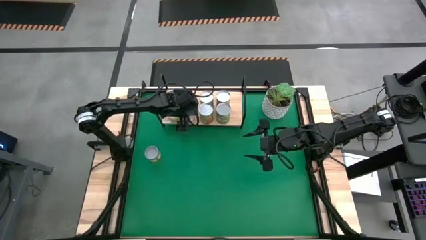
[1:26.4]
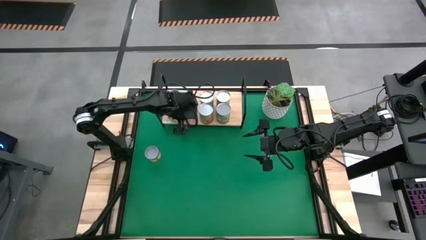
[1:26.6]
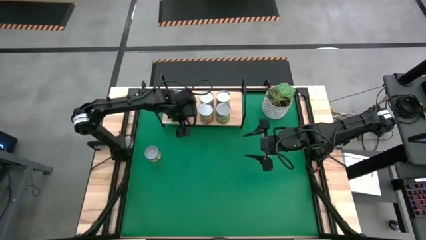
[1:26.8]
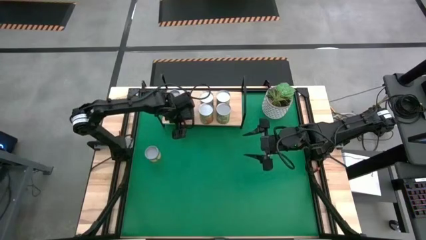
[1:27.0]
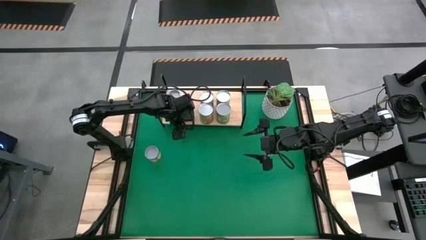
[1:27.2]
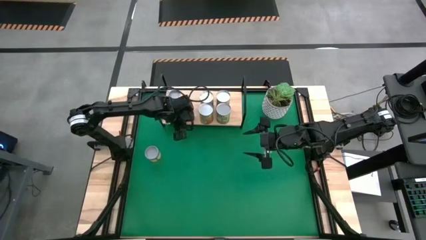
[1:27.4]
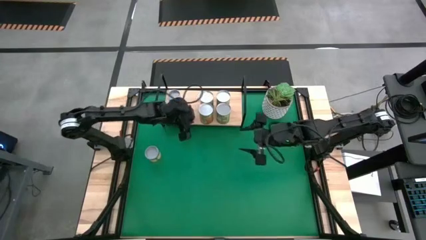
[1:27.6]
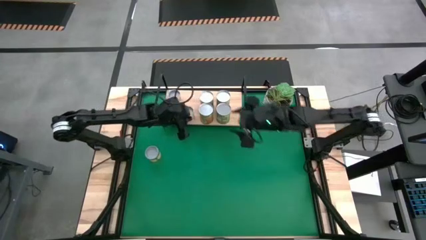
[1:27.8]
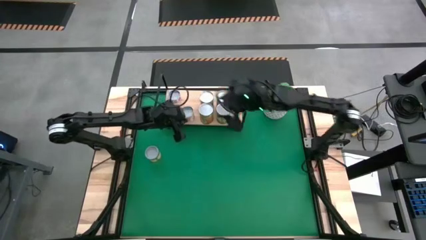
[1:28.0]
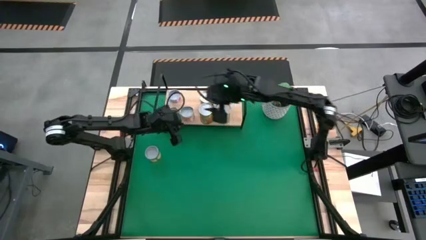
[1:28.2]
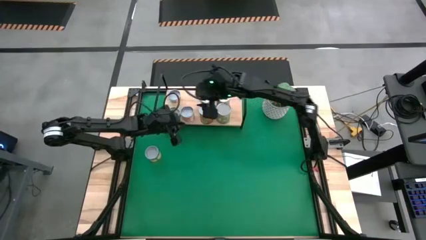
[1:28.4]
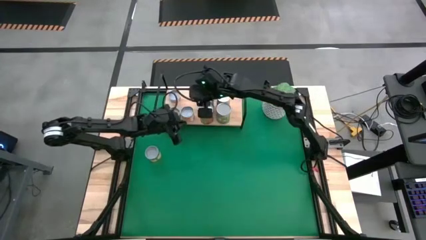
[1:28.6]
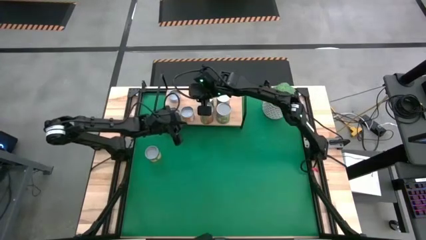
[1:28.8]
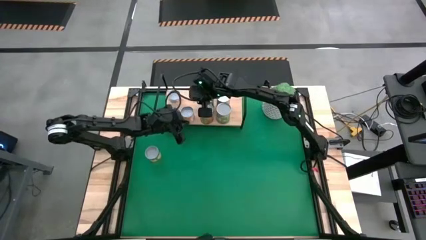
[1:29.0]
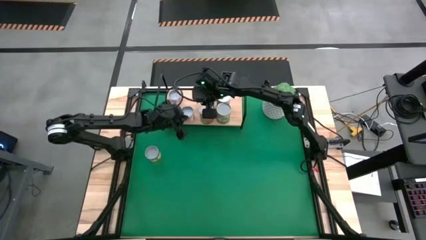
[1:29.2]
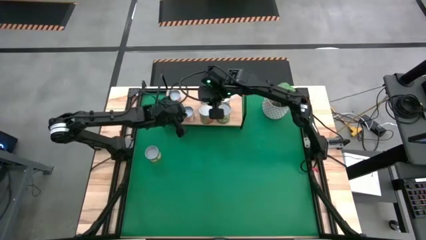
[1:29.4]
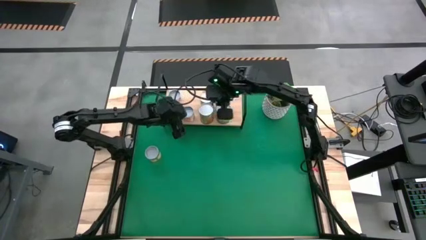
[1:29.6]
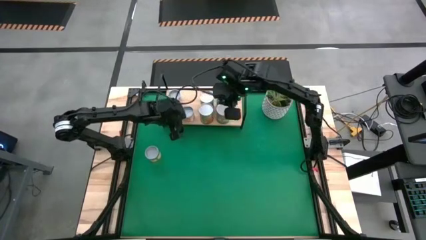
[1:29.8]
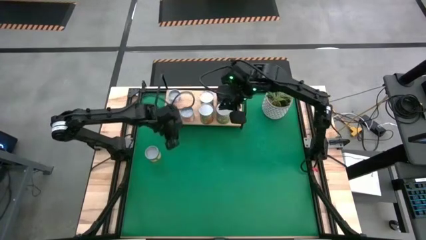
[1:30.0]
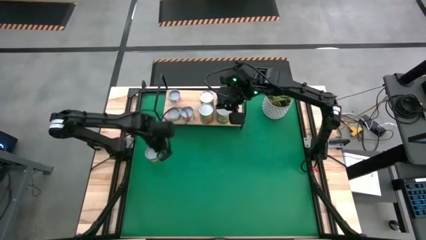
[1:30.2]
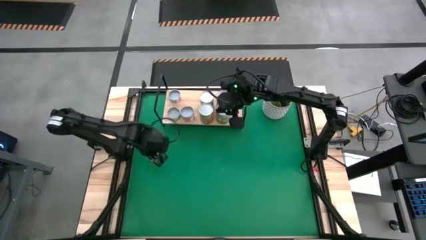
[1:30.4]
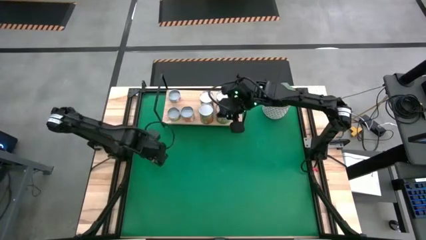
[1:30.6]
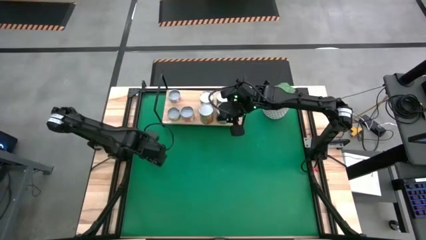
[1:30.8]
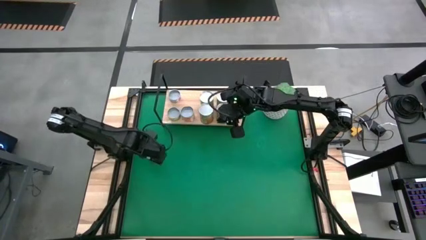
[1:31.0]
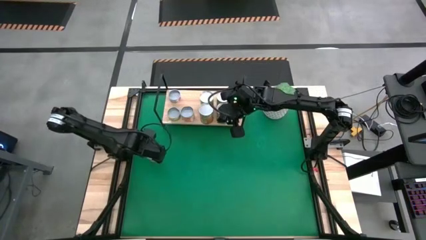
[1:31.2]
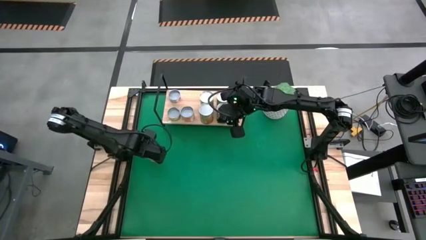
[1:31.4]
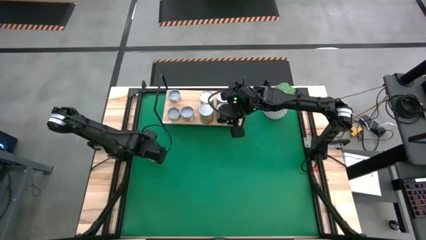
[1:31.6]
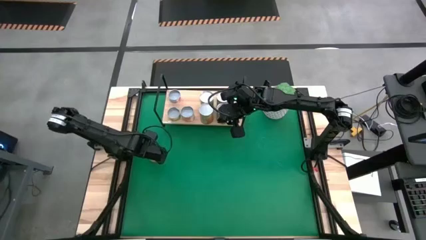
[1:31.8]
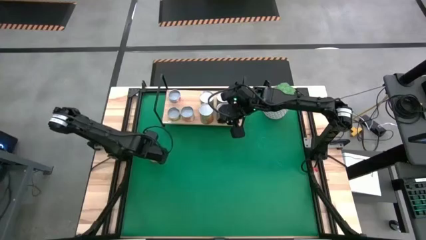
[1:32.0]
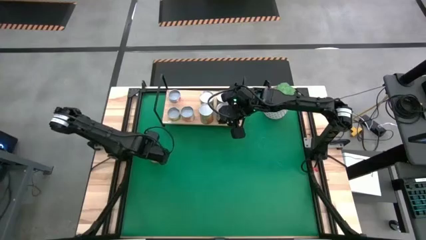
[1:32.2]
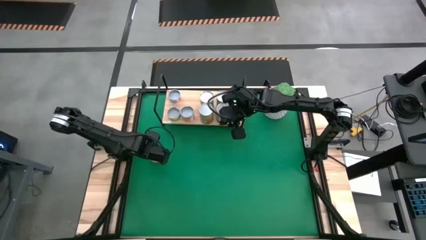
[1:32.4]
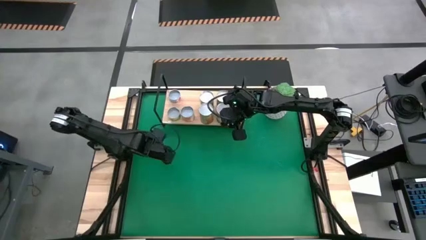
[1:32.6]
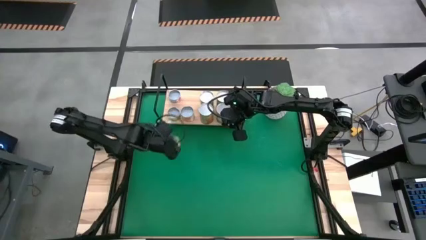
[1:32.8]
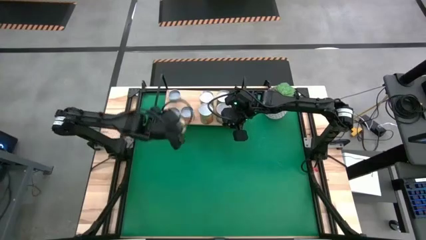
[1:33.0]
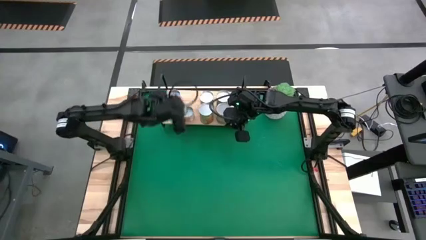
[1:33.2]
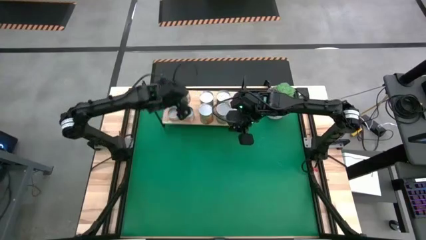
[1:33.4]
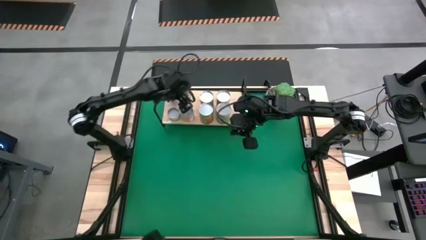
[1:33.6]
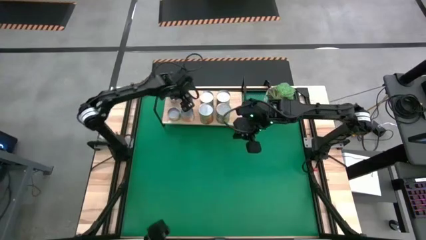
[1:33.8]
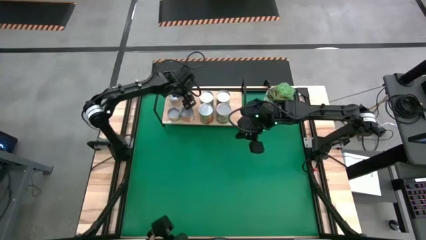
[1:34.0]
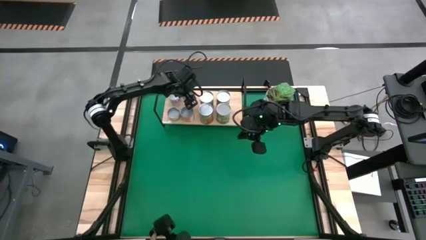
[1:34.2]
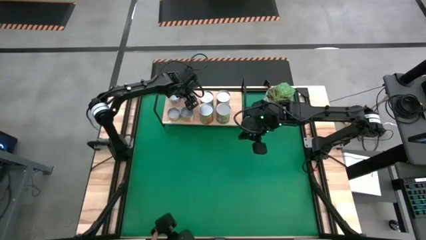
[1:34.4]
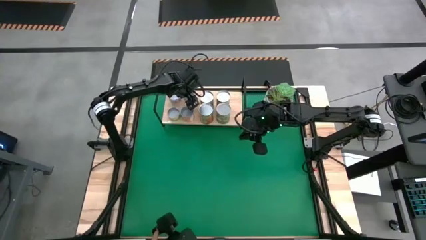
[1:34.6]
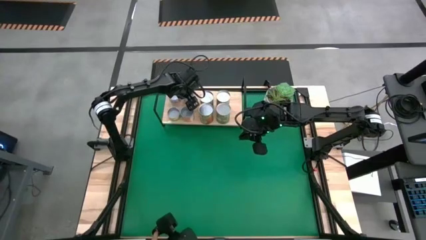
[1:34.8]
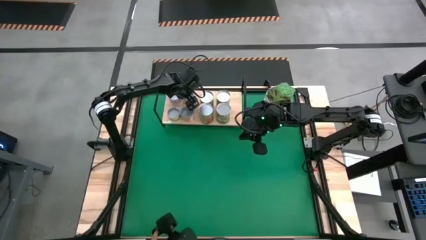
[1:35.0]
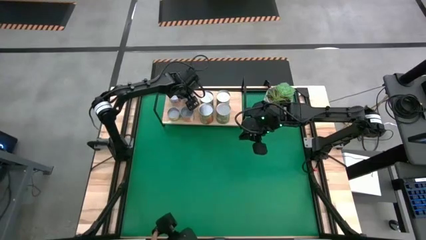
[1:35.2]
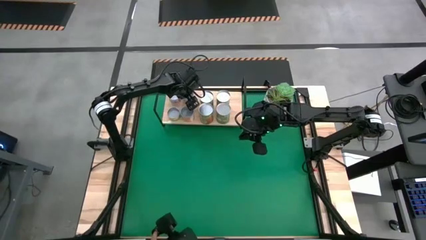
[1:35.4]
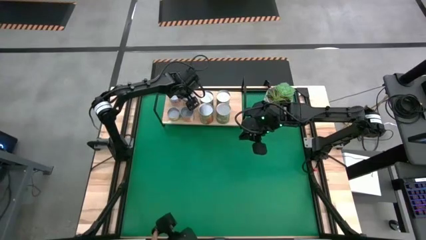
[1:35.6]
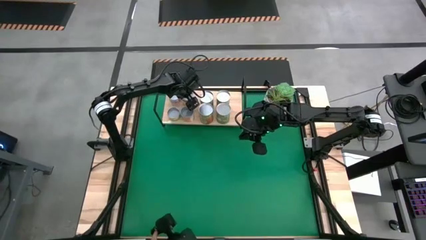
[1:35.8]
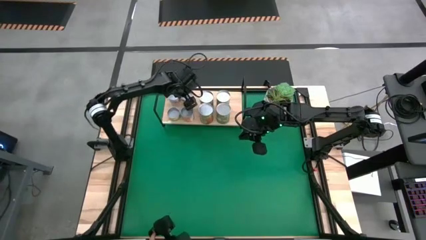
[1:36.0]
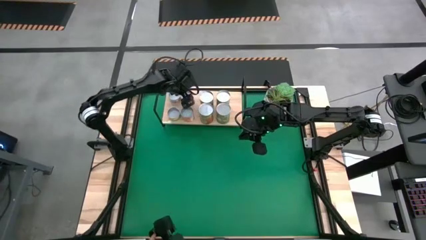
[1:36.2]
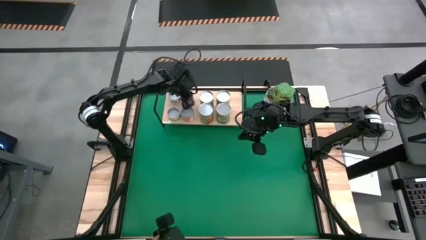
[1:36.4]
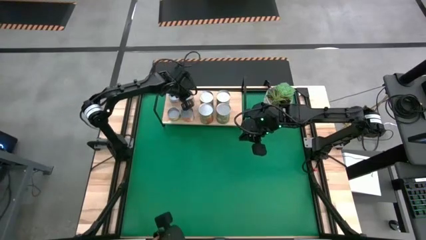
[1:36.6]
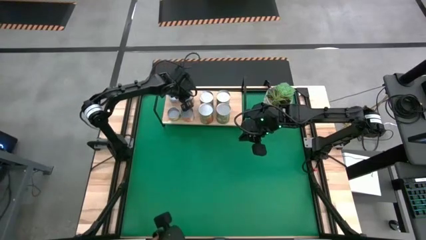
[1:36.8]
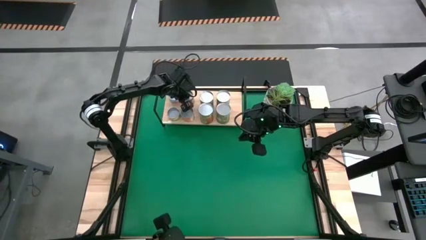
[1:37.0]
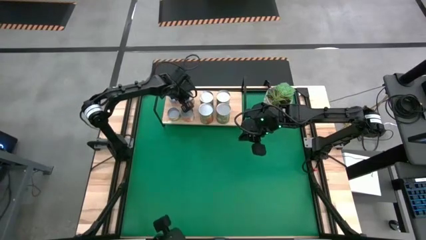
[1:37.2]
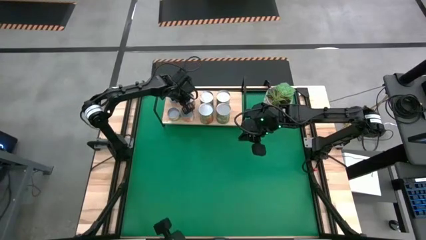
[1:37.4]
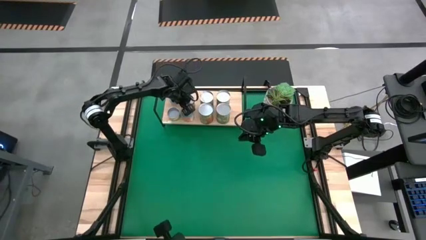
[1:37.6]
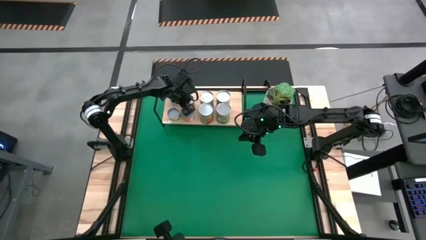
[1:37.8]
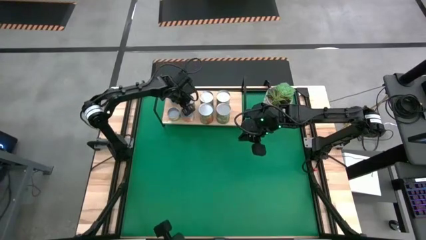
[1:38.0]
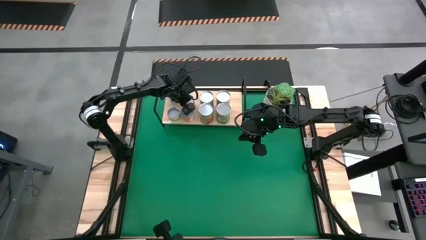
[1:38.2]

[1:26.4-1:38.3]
Task: Pick and place cans onto a shelf
Put the green canned goods on the shelf

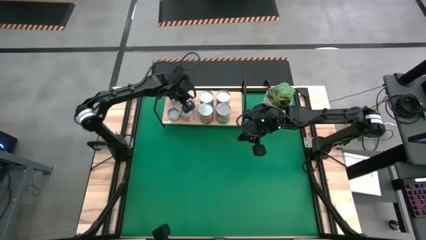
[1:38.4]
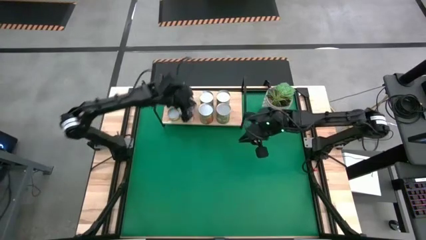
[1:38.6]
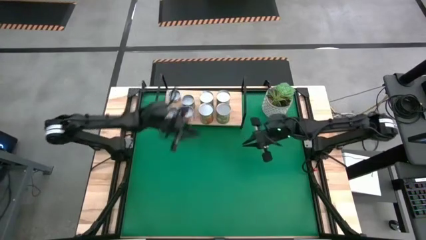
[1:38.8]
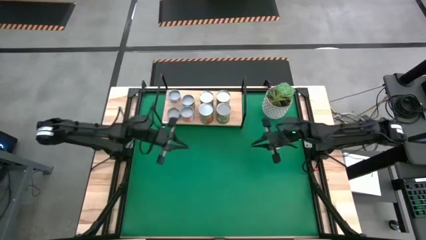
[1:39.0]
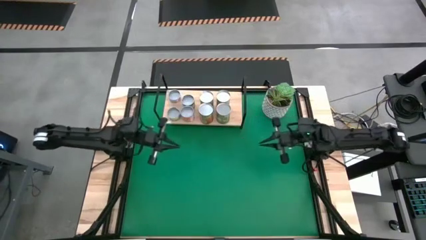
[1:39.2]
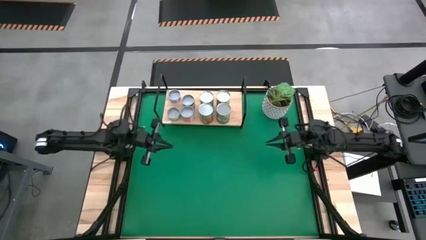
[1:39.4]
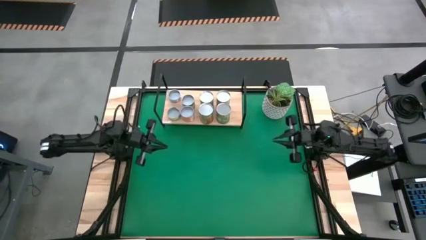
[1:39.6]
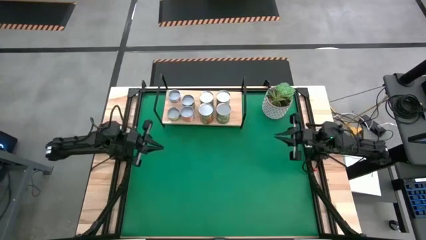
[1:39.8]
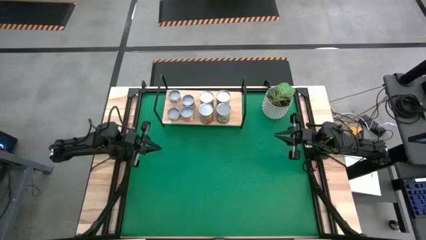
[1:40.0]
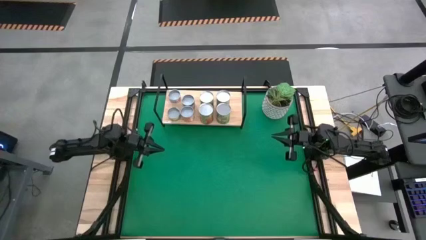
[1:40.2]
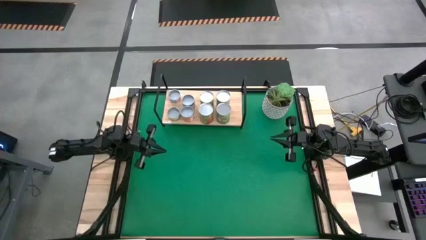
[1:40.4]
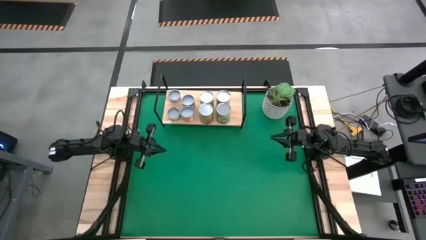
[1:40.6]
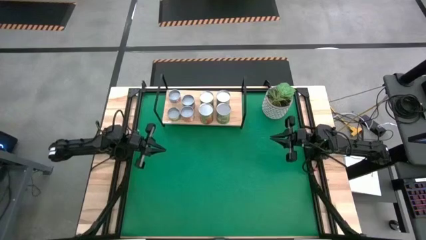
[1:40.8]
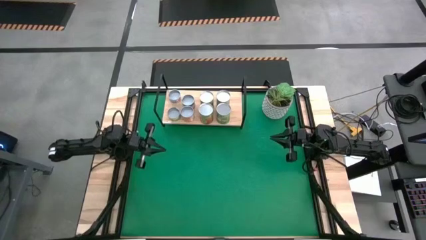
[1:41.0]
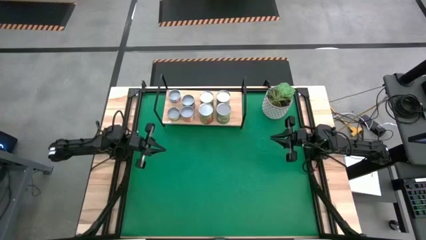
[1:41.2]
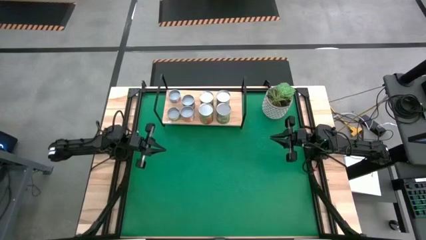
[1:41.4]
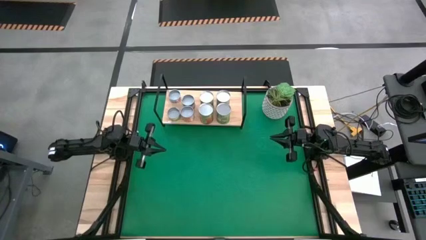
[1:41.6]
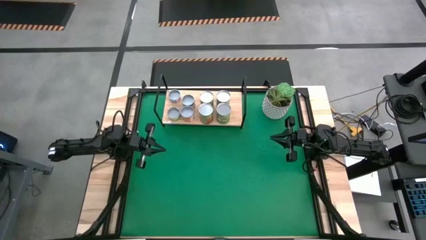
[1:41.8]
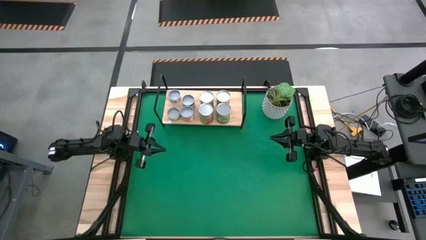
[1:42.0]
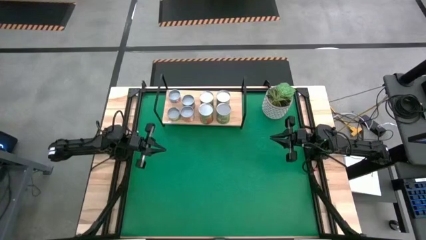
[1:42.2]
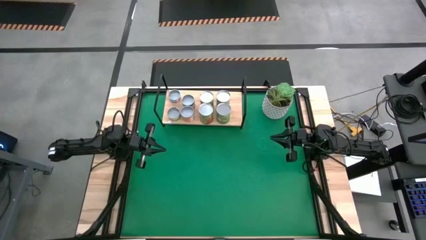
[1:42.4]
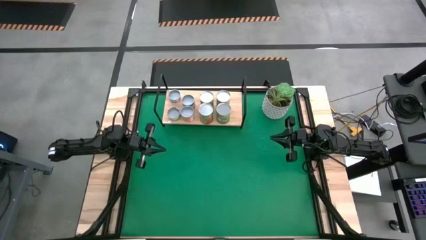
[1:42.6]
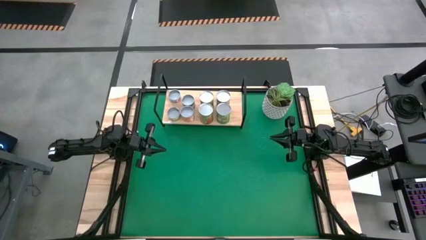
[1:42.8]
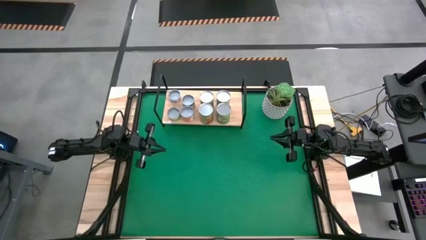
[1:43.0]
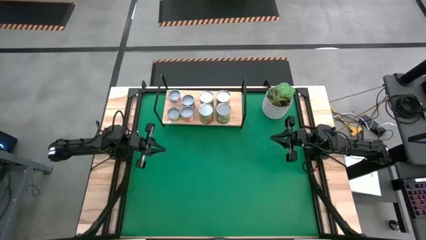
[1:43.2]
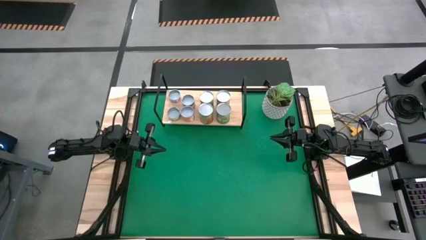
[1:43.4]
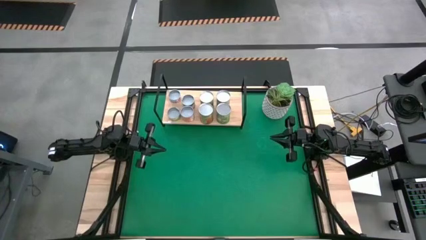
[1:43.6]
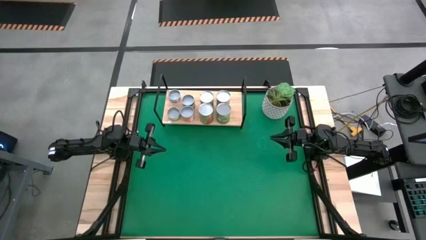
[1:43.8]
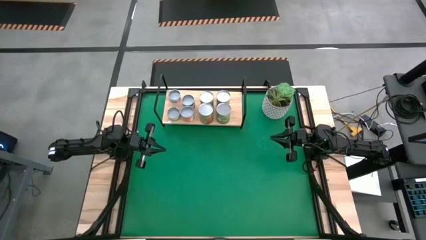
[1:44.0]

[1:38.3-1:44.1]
Return to Home Position
